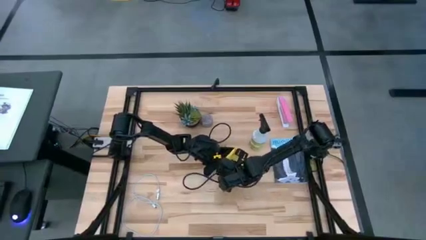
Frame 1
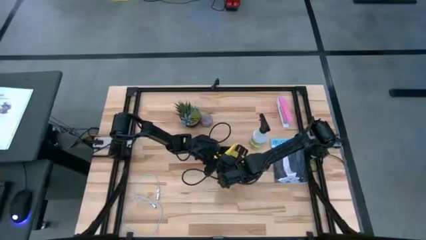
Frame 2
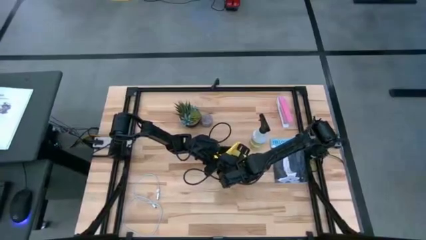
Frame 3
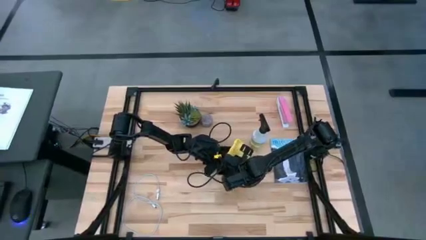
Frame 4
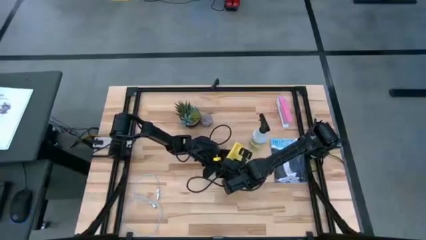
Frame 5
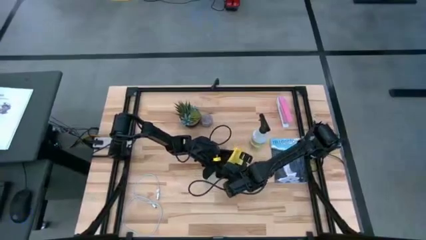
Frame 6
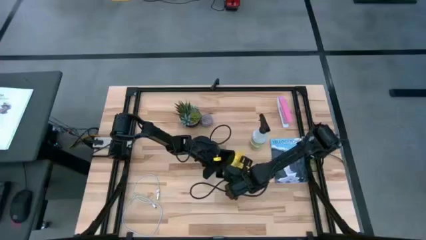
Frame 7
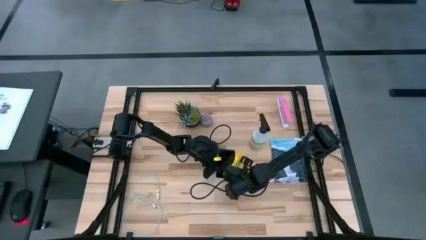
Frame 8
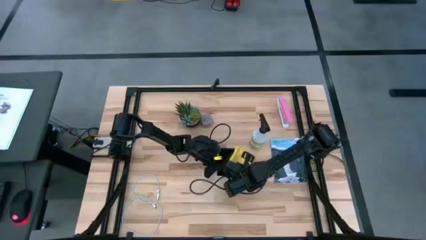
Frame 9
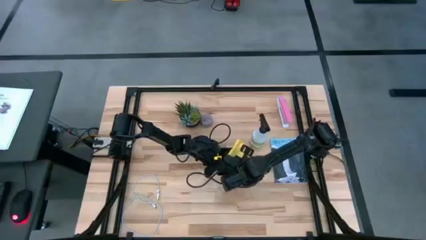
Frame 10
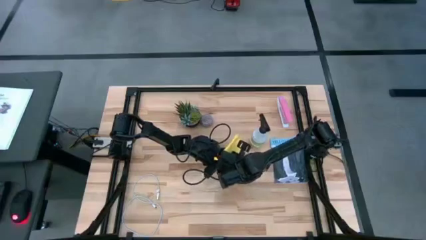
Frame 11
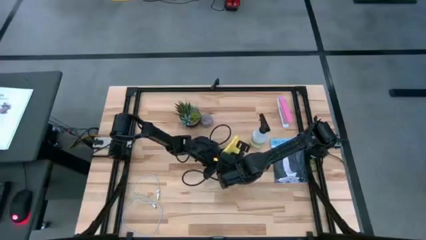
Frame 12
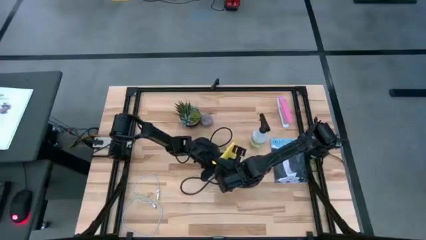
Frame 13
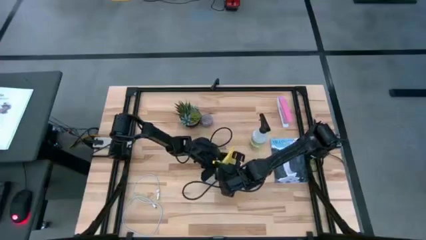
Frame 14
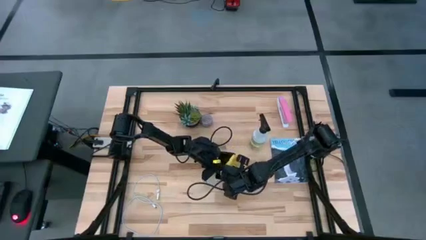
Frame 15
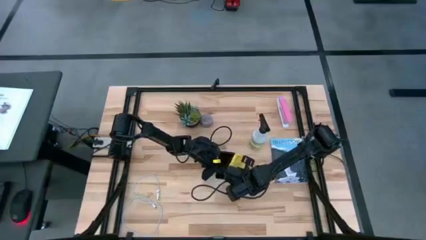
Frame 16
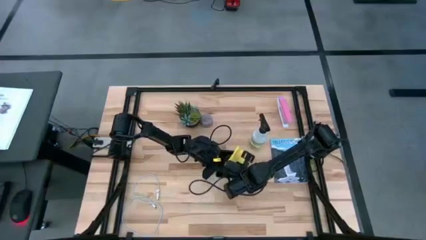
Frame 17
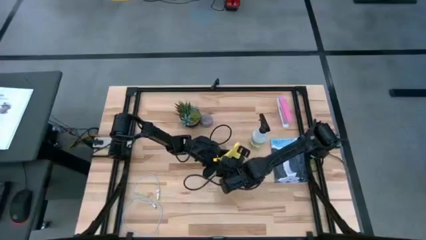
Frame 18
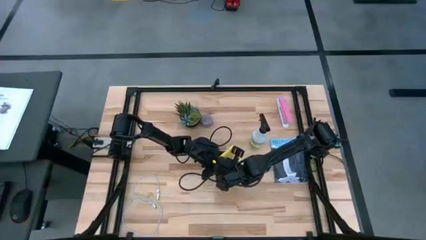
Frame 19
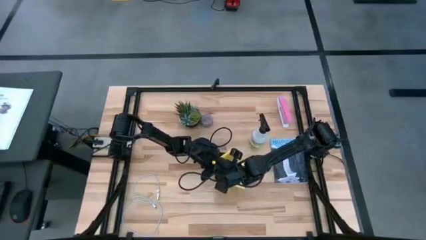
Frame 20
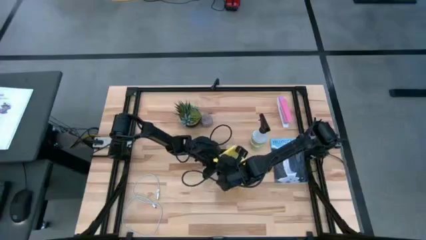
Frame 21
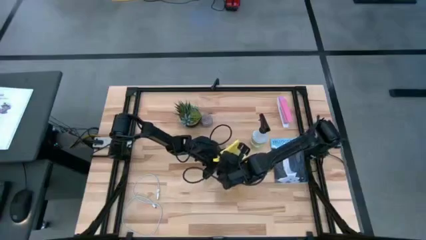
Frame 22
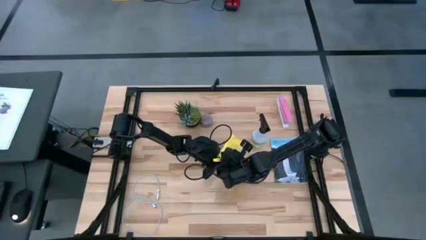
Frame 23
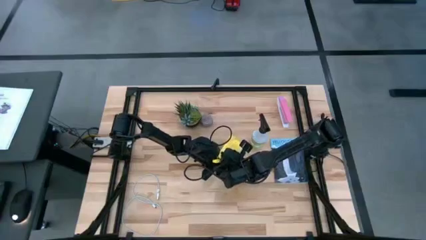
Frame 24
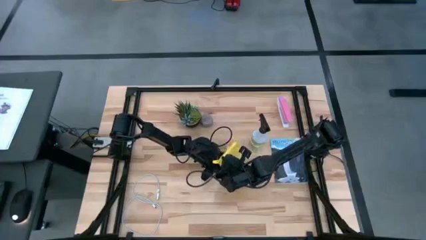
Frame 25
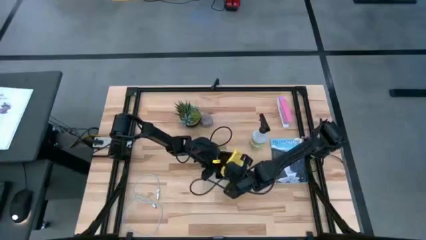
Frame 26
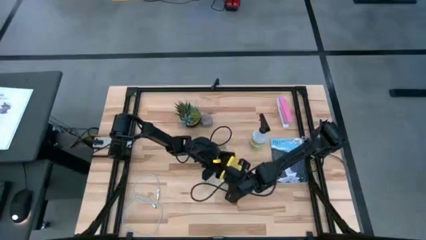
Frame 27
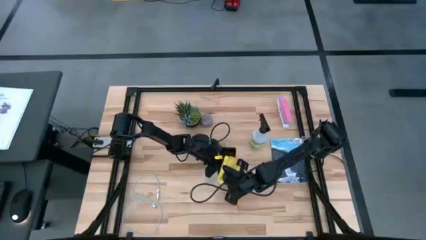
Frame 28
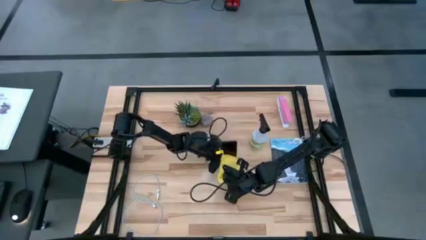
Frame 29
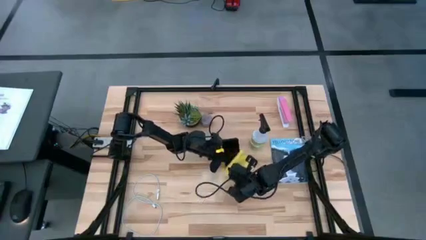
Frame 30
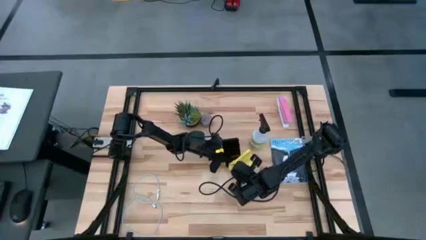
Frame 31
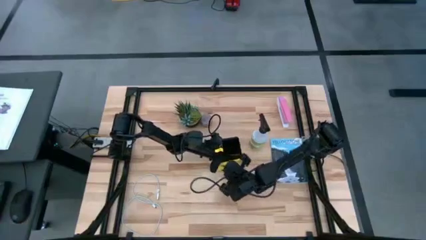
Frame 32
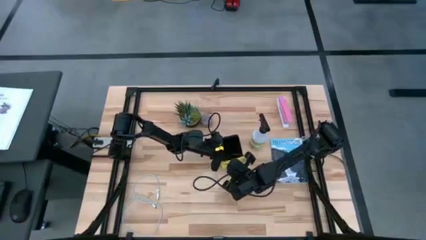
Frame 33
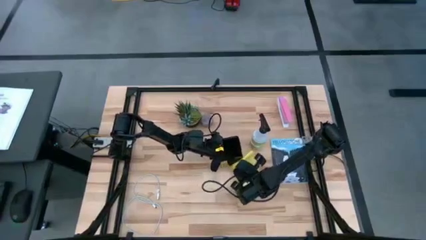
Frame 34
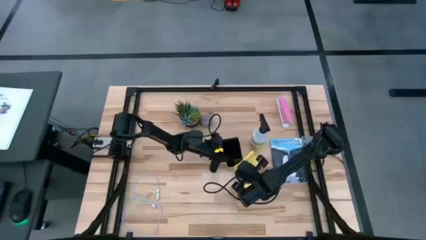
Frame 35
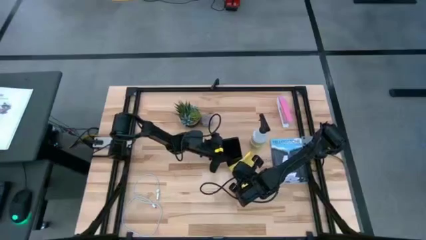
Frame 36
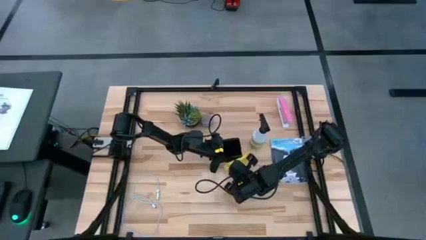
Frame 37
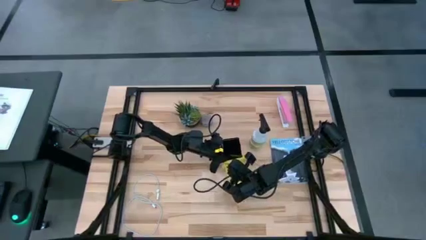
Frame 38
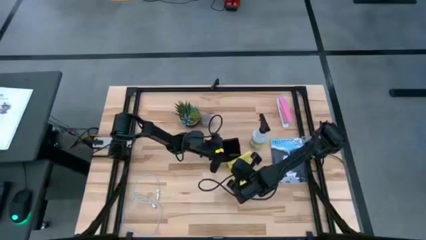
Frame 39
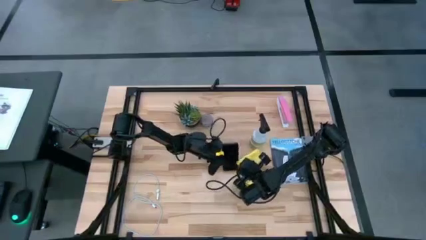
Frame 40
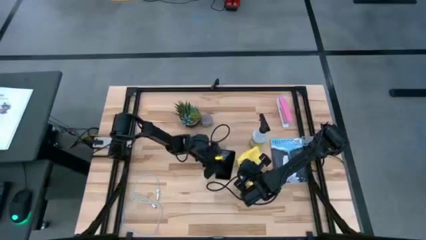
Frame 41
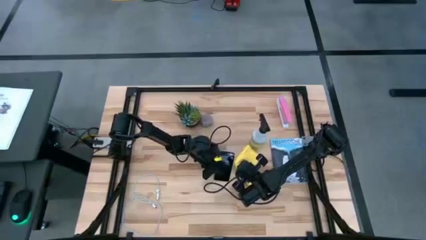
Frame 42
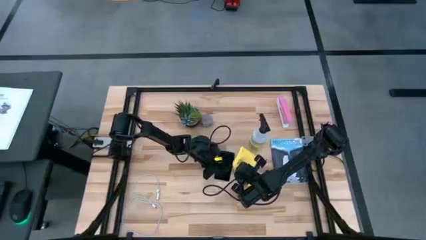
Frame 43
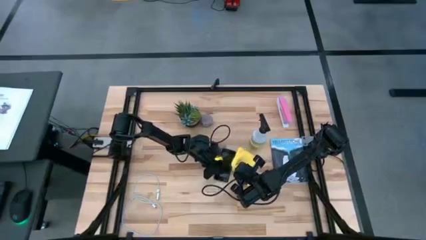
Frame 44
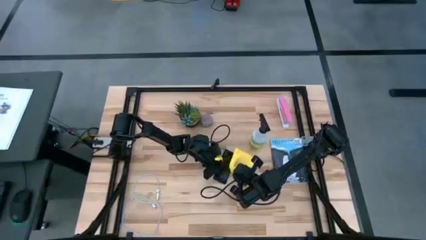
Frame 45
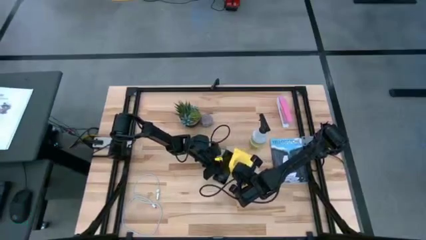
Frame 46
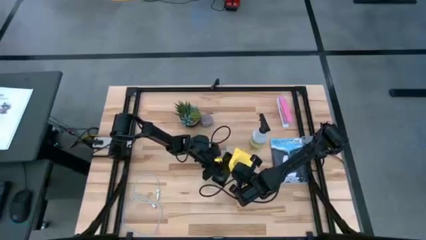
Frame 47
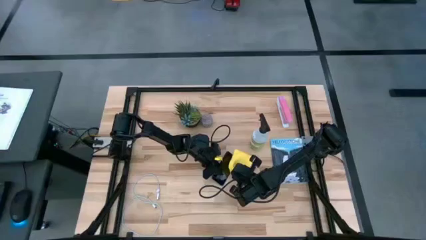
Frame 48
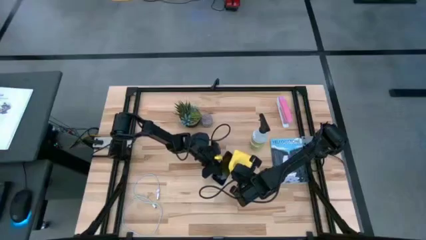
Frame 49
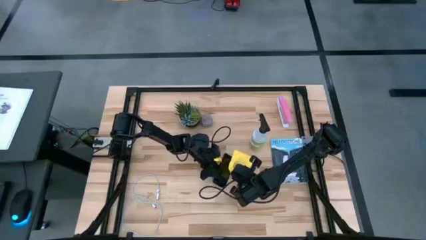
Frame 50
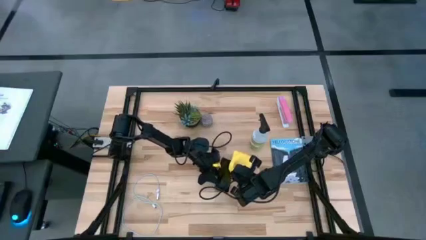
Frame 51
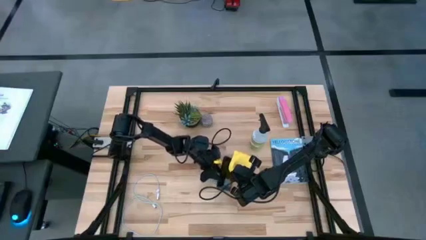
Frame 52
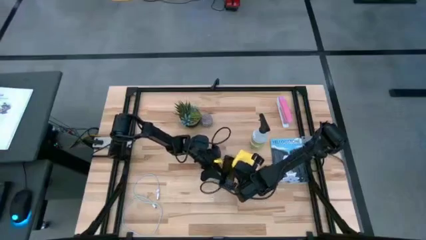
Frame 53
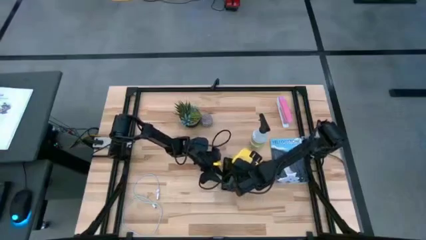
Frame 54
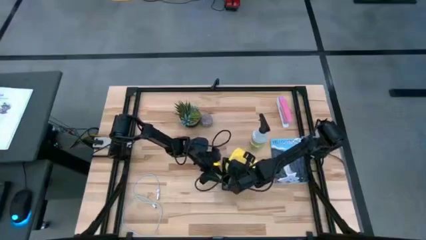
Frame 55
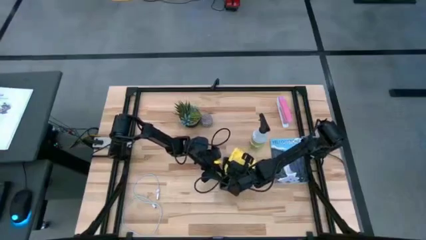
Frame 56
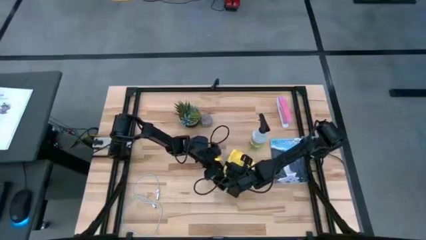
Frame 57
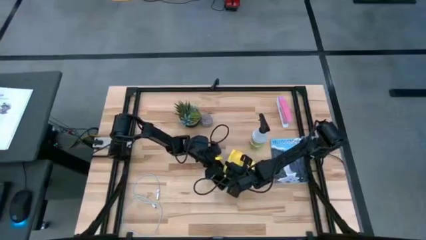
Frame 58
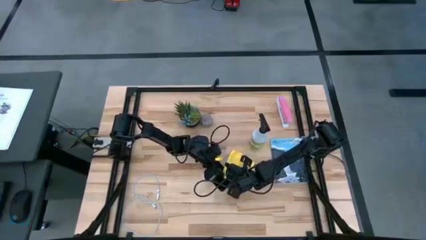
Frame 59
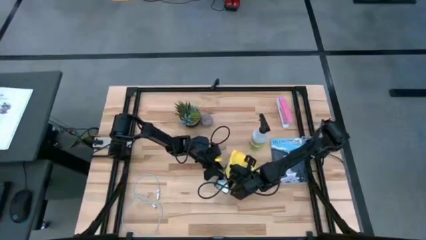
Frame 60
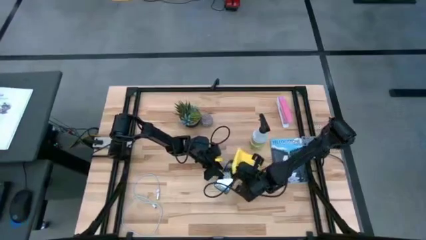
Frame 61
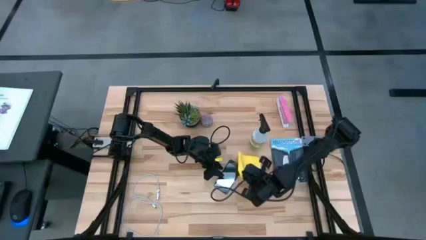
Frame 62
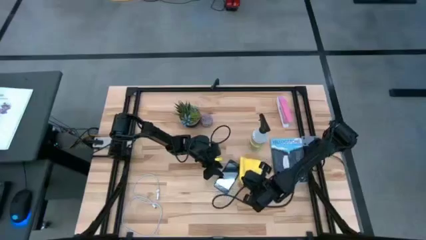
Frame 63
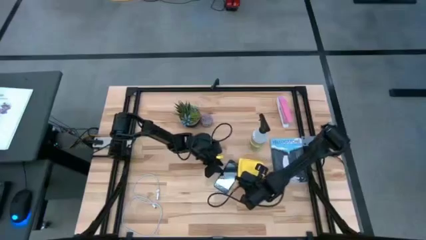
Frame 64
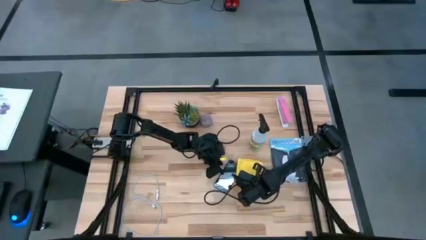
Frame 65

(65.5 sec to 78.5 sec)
Task: Apply microfiber cloth
Wipe the front side of the cellphone using the yellow microfiber cloth
